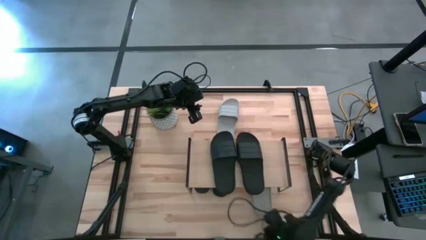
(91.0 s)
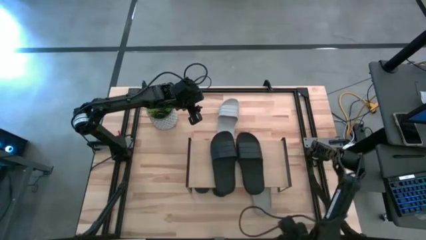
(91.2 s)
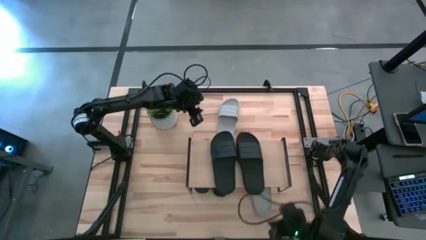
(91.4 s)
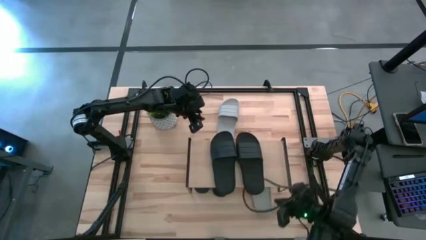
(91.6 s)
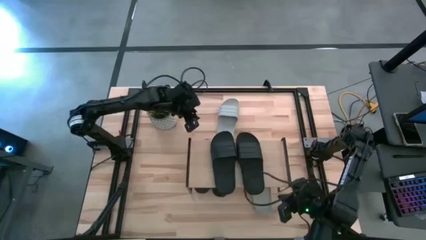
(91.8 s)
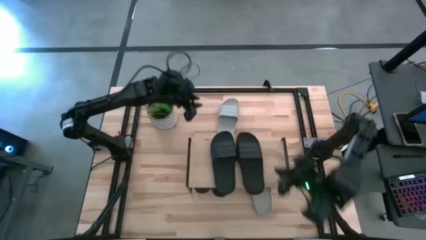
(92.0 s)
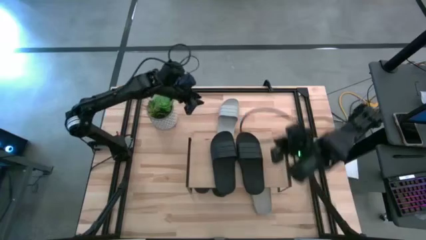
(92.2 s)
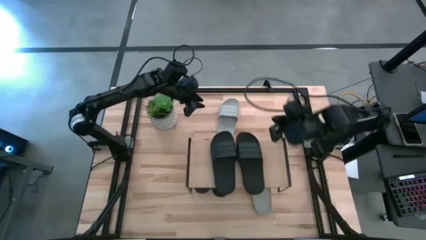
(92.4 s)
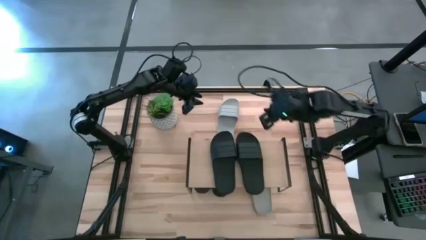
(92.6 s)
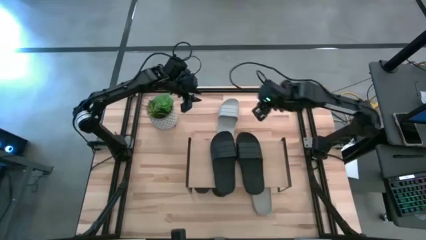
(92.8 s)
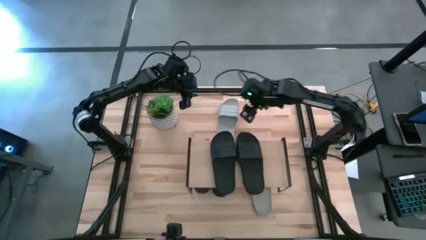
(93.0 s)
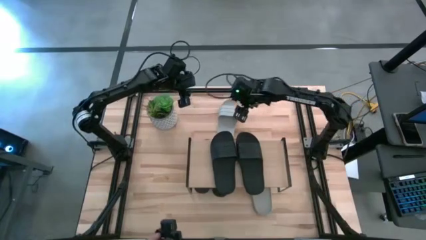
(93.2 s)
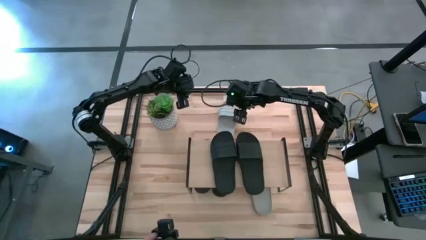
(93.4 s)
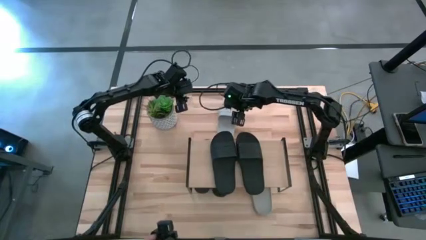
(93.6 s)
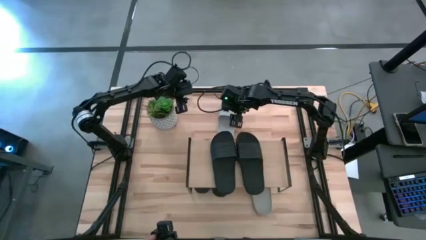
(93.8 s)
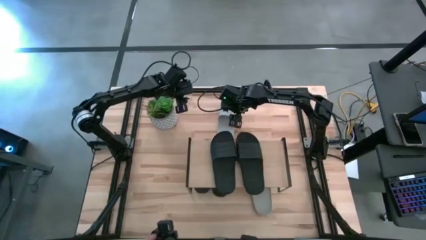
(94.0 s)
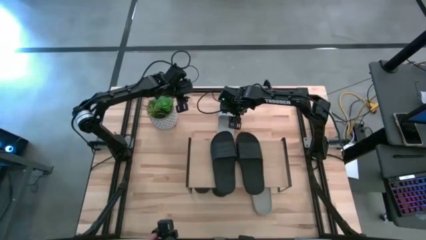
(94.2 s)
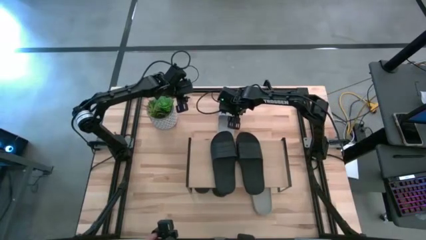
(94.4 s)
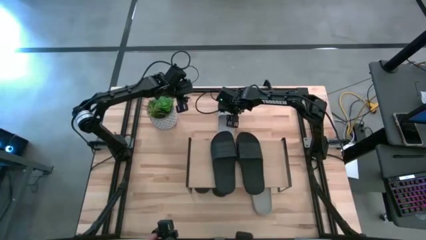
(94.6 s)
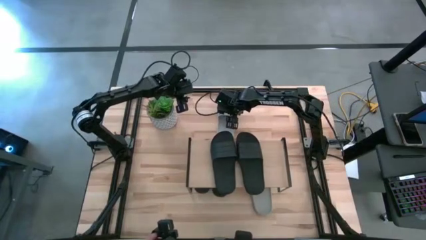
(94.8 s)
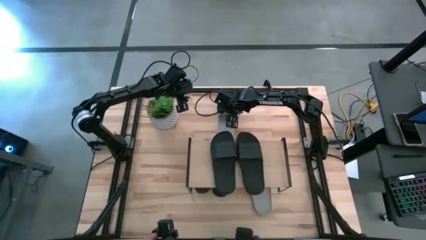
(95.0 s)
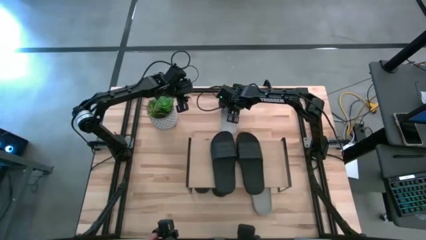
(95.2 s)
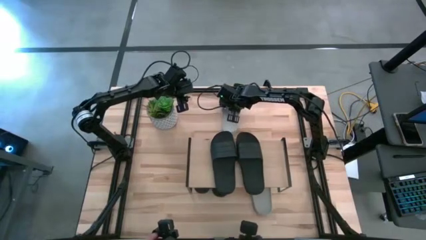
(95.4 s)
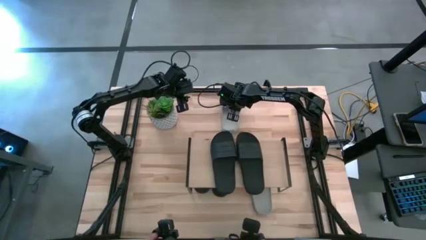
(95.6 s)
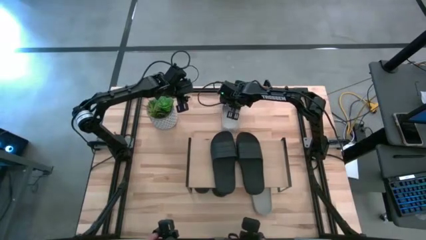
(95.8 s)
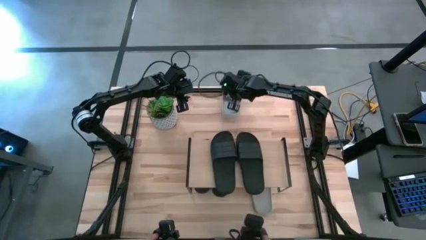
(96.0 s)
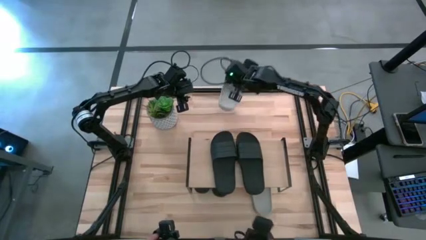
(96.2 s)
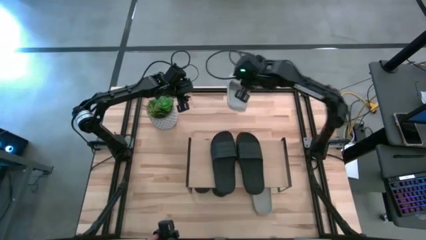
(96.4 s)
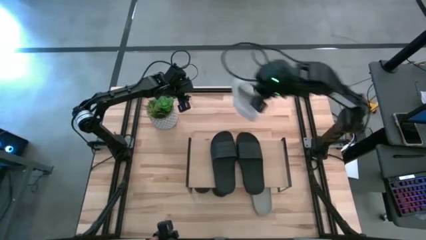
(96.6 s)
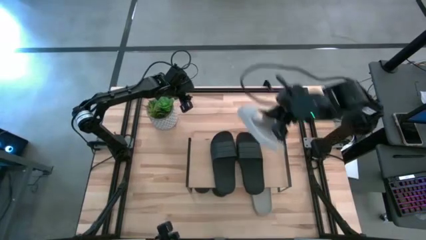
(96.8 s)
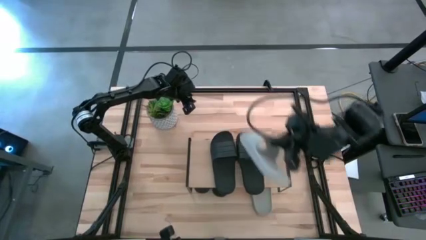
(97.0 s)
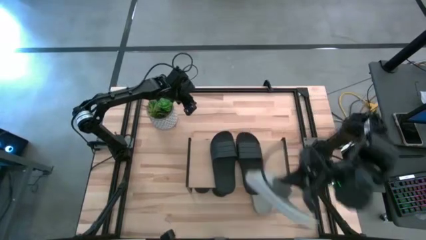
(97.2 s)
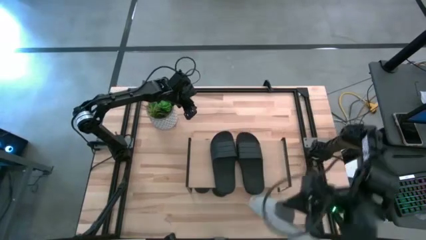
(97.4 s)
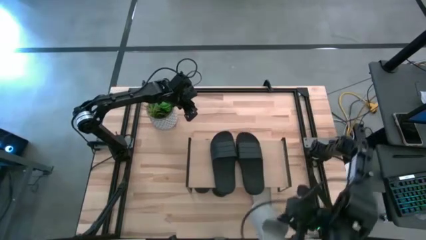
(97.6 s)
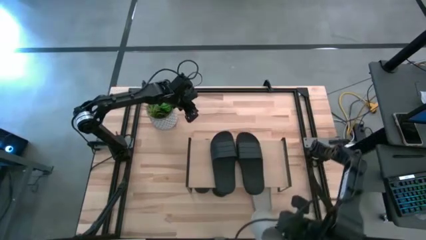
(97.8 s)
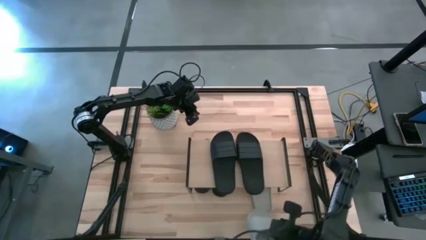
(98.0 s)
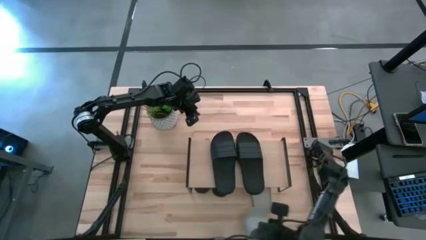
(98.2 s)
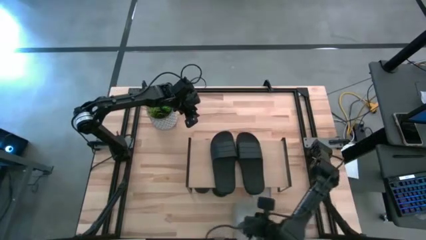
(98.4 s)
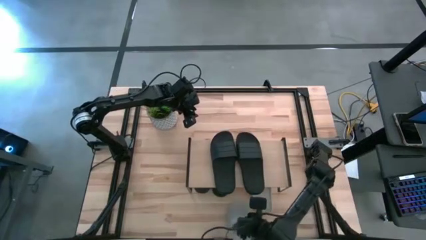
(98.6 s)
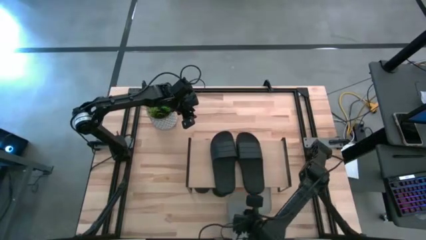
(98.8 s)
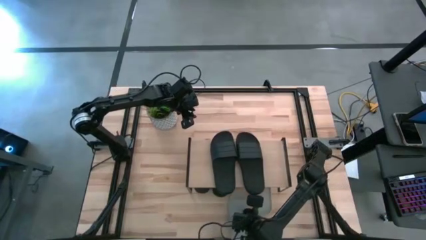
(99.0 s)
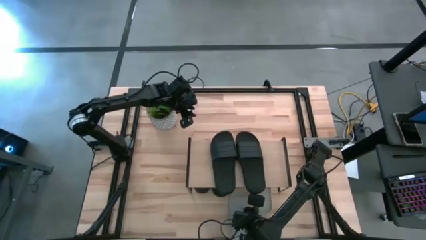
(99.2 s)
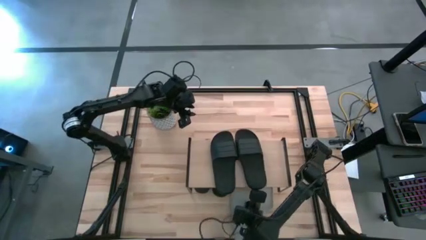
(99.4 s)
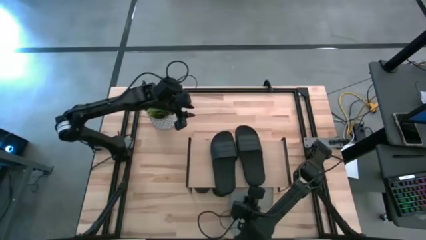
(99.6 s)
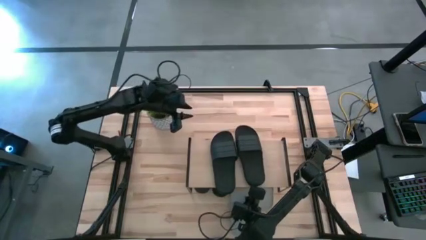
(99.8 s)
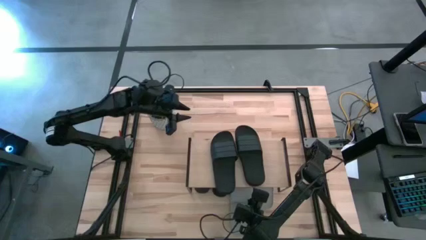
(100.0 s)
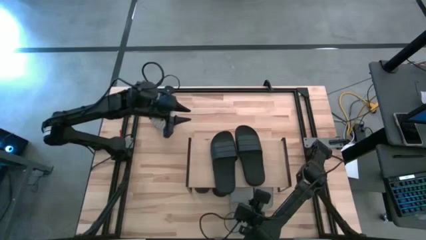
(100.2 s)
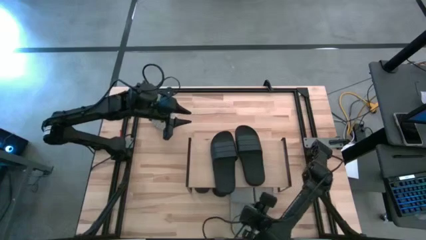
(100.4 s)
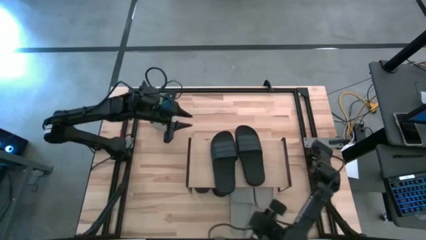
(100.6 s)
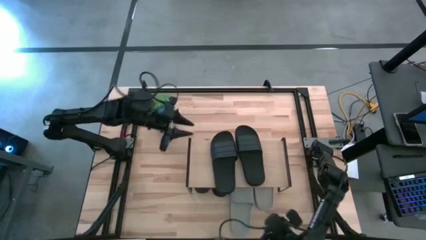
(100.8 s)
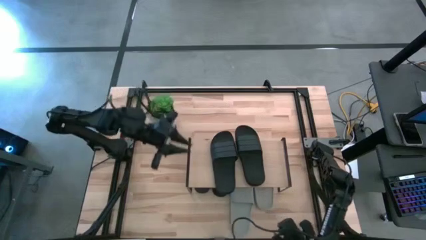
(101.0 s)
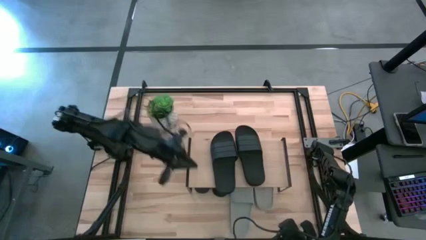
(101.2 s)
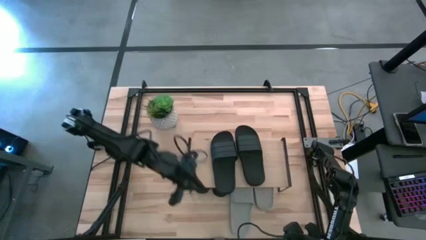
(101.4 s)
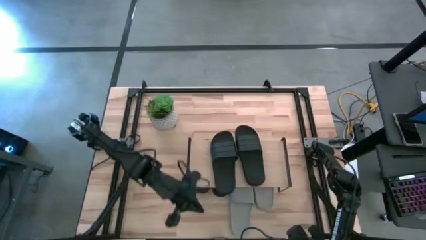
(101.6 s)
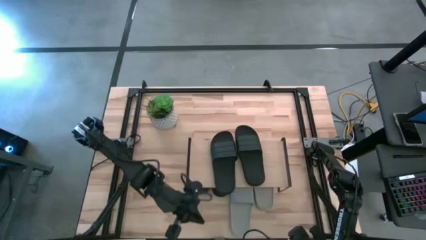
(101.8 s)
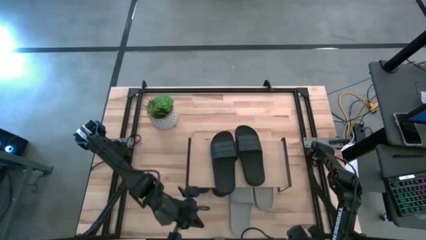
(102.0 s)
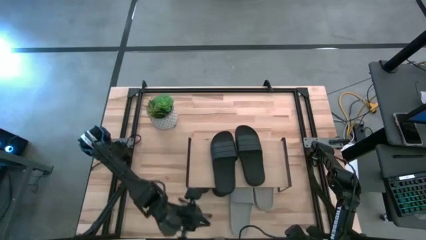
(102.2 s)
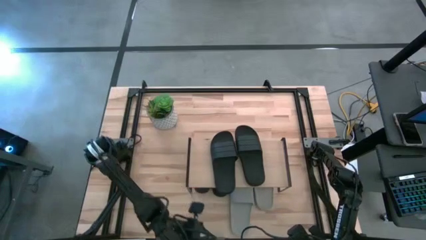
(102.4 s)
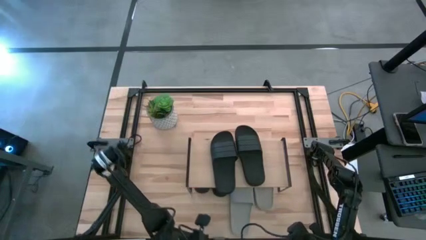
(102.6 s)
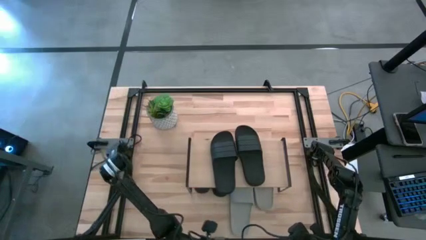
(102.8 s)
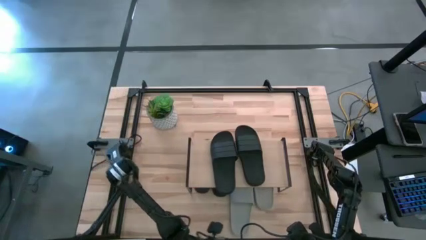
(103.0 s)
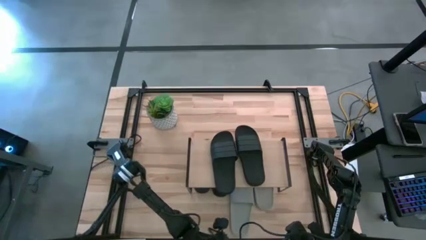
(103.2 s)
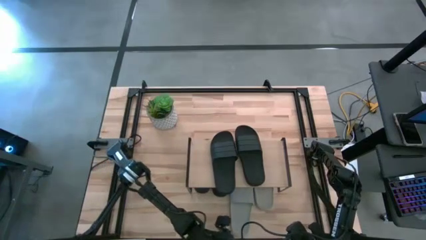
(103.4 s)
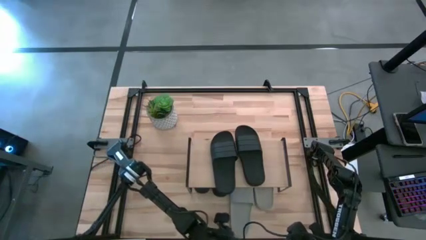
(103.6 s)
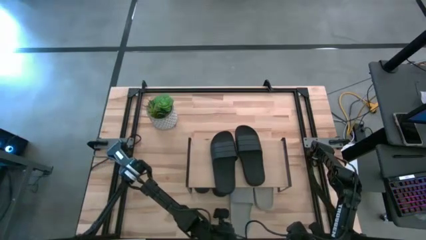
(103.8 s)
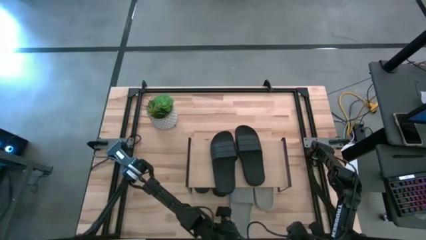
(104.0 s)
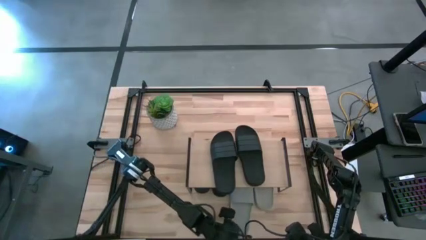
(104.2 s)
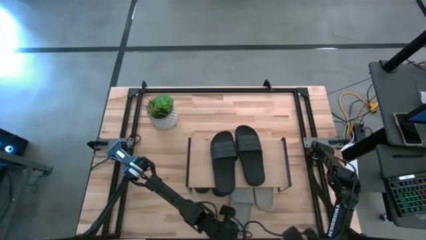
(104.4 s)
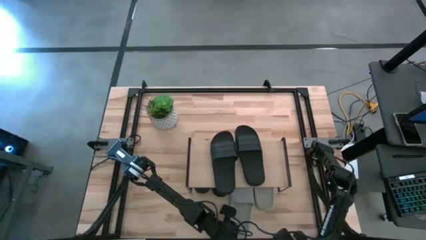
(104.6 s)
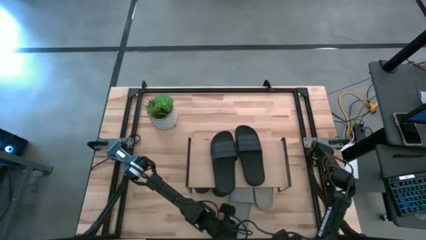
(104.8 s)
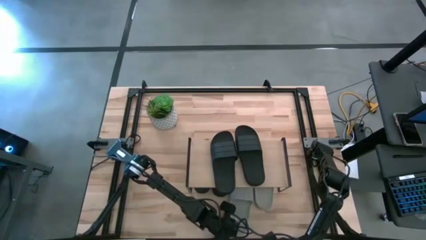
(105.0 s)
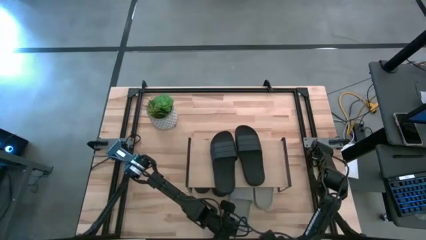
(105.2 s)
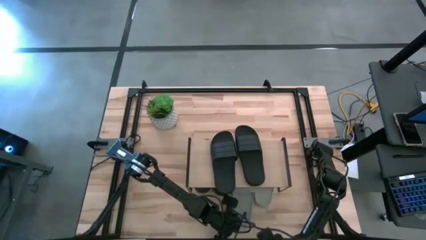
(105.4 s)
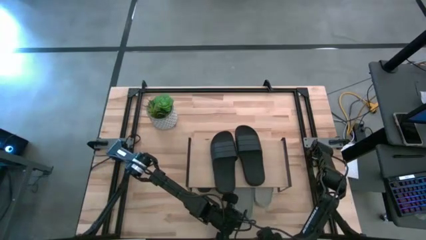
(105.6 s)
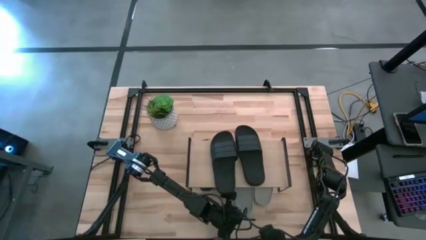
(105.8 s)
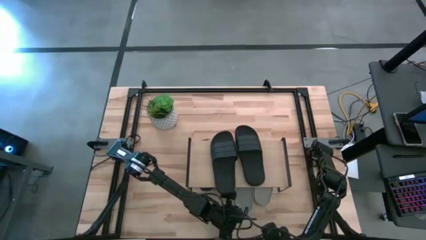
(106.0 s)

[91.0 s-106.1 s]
Task: Pick and place slides into the shelf
Put the gray slide under the shelf

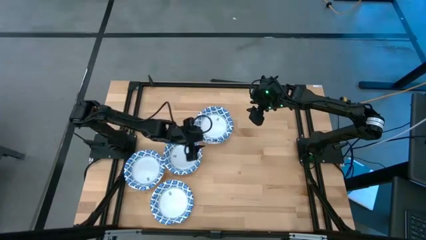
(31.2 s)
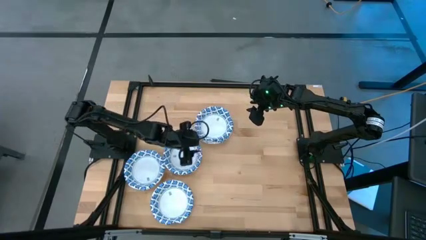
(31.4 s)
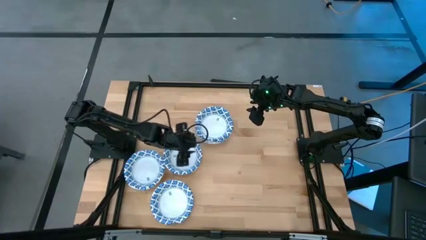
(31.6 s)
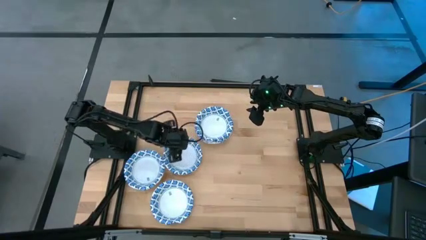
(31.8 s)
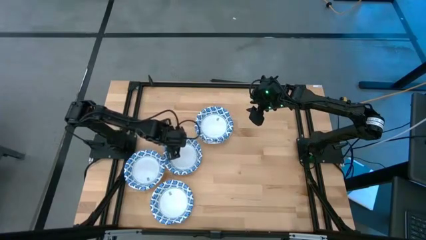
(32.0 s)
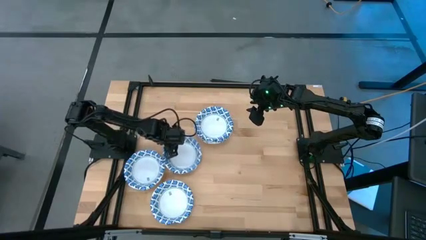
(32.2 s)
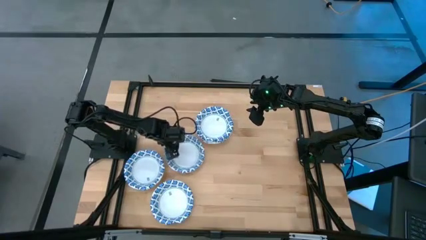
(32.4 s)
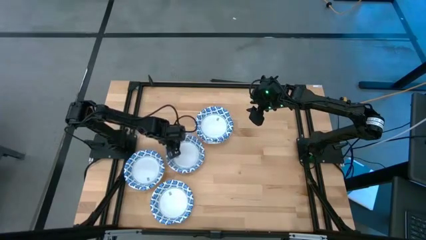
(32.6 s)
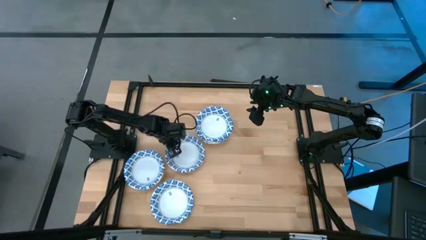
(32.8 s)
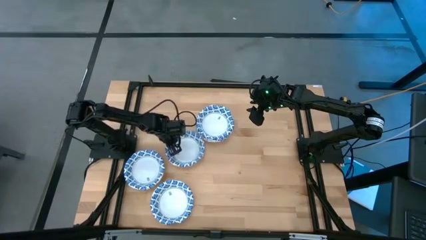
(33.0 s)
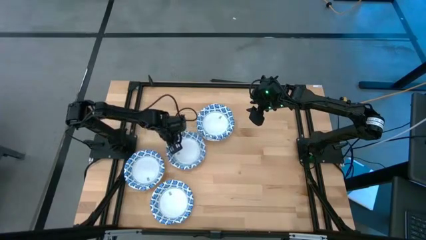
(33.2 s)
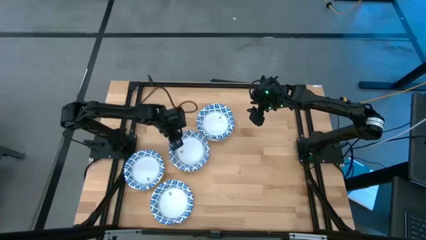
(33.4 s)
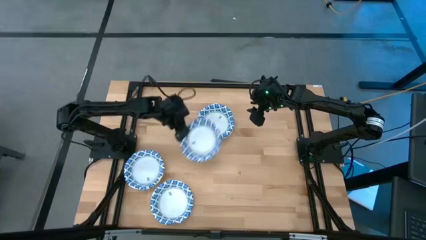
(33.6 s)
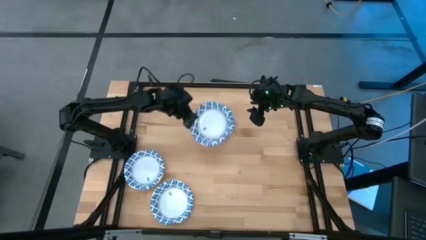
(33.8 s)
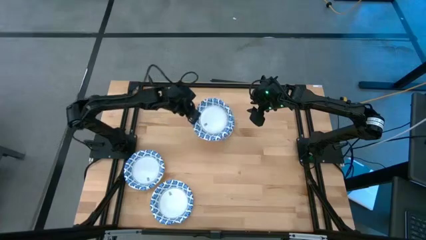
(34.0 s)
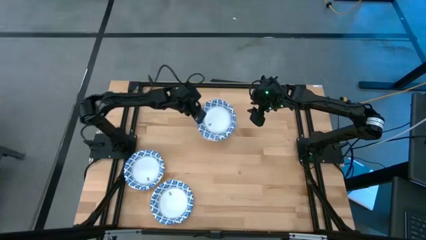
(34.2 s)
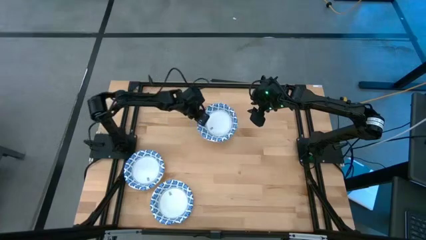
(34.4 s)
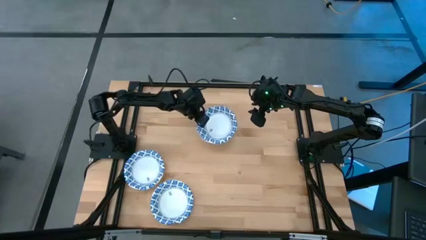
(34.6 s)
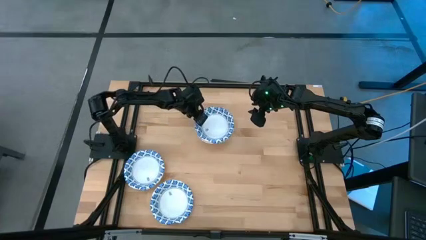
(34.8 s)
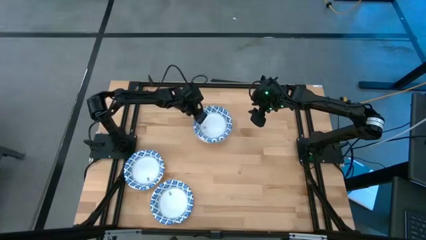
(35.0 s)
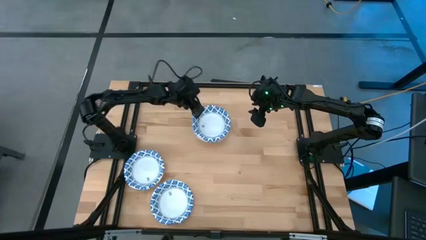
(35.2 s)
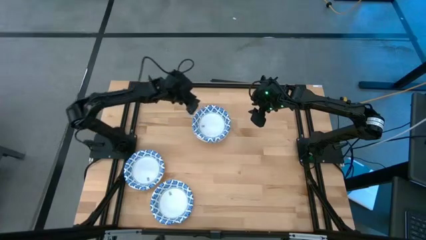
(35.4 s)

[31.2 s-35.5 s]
Task: Nest bowls inside each other
Stack the white and blue bowl on the white and blue bowl on the table
